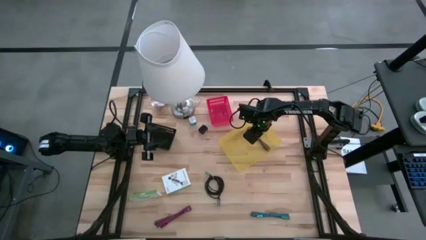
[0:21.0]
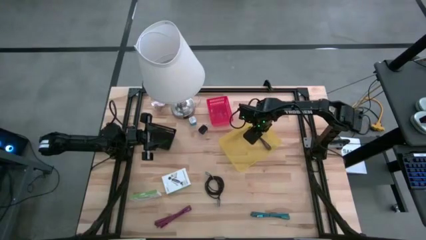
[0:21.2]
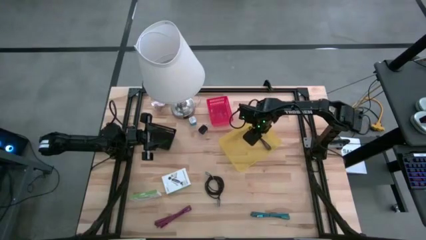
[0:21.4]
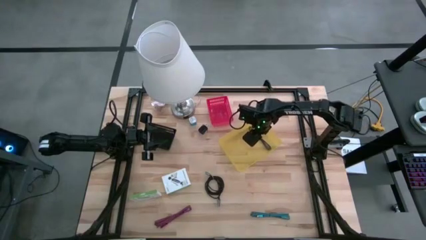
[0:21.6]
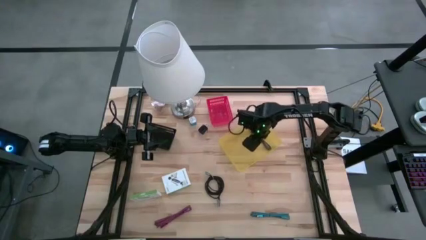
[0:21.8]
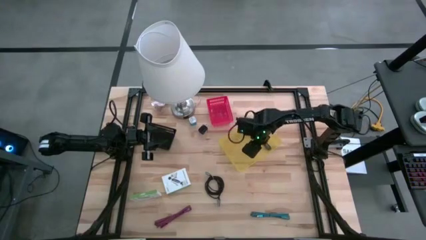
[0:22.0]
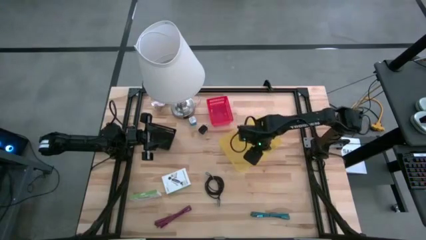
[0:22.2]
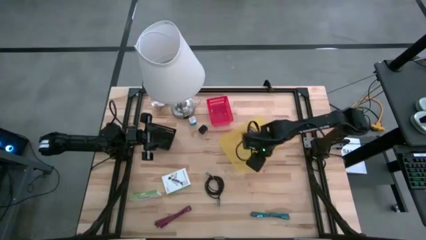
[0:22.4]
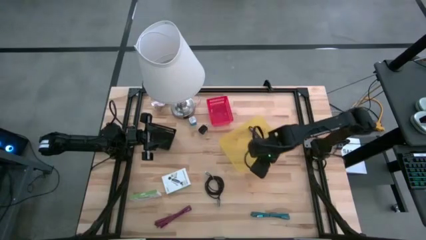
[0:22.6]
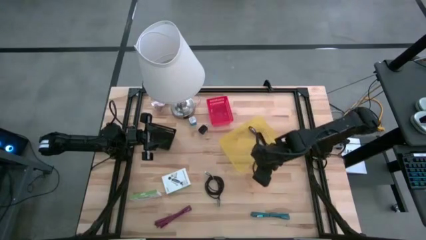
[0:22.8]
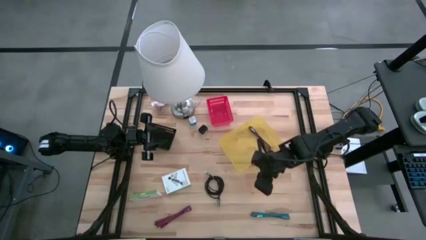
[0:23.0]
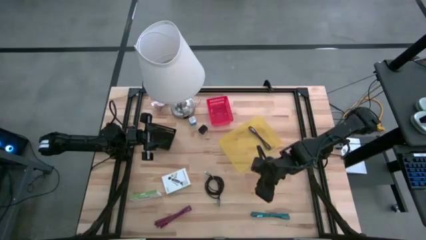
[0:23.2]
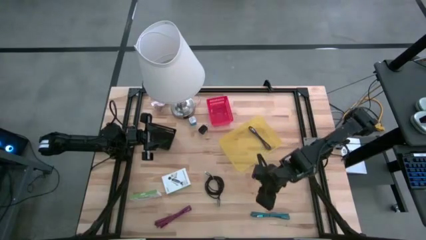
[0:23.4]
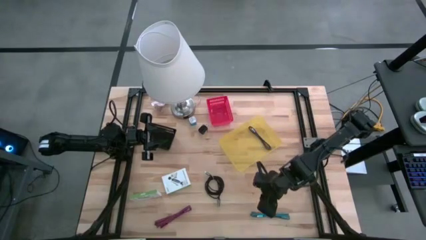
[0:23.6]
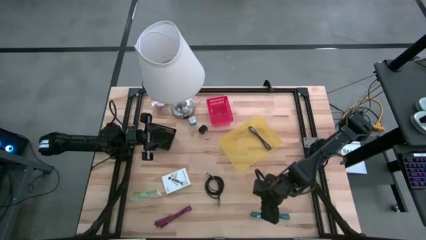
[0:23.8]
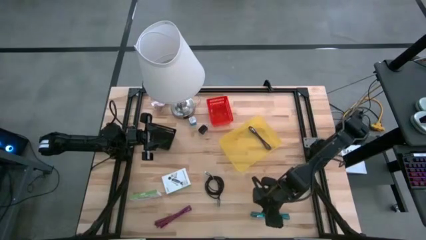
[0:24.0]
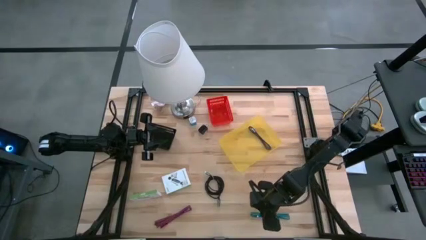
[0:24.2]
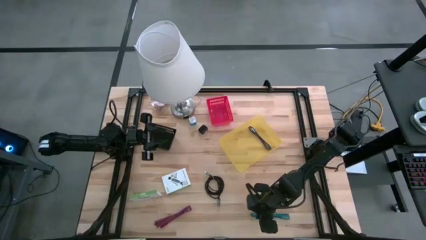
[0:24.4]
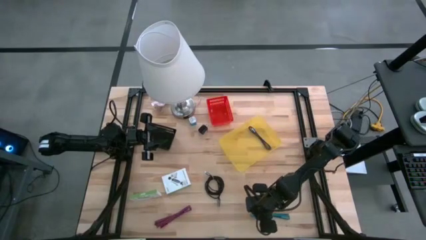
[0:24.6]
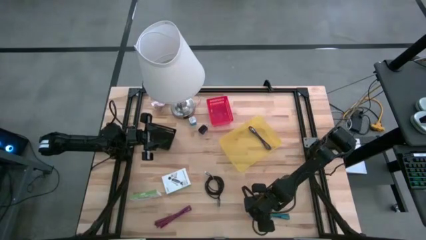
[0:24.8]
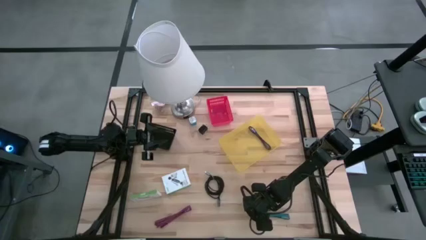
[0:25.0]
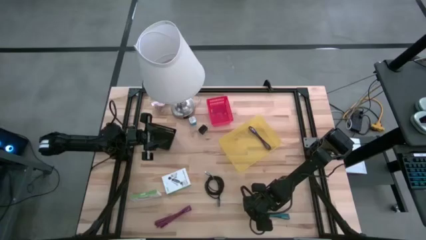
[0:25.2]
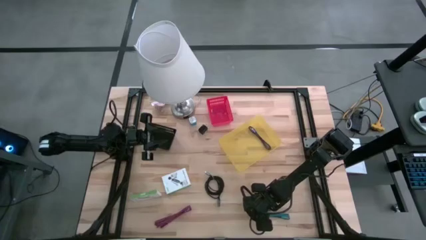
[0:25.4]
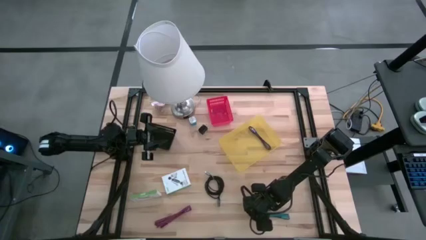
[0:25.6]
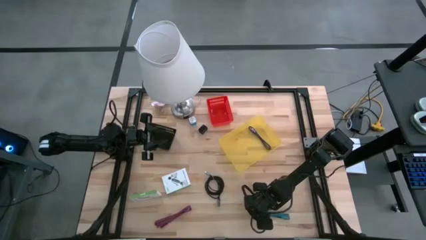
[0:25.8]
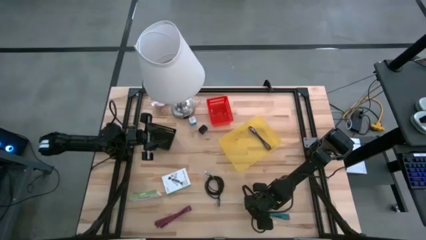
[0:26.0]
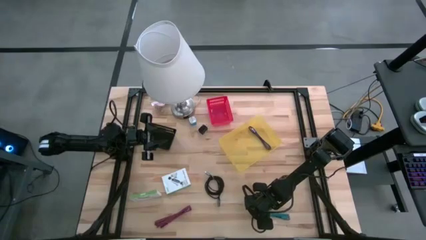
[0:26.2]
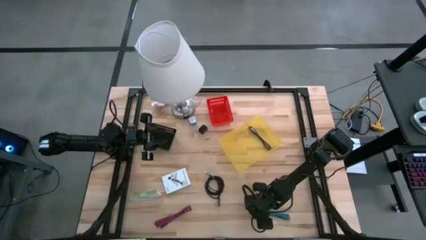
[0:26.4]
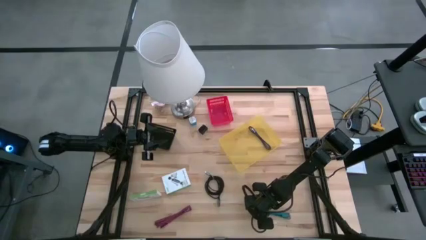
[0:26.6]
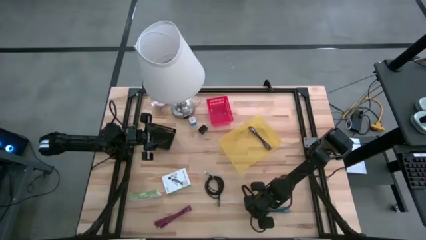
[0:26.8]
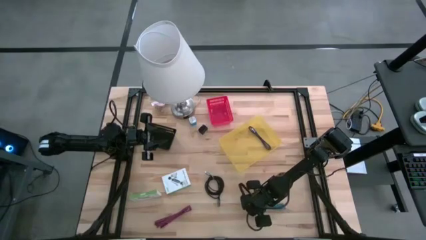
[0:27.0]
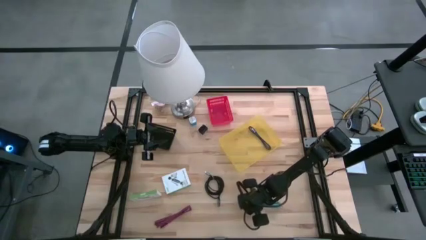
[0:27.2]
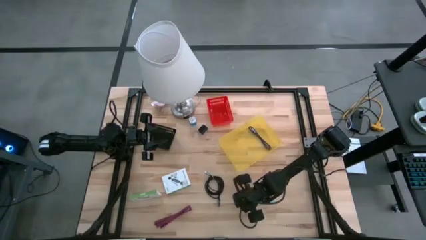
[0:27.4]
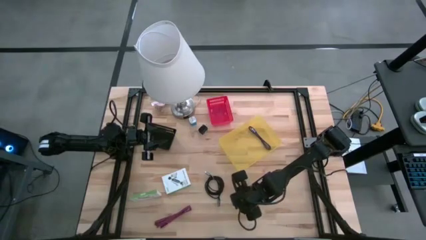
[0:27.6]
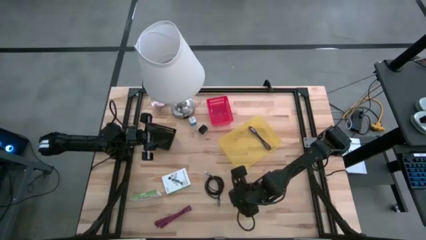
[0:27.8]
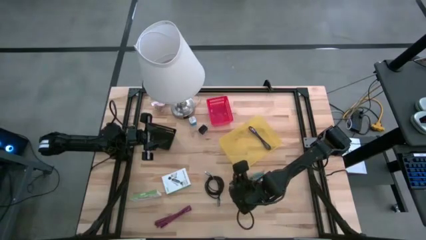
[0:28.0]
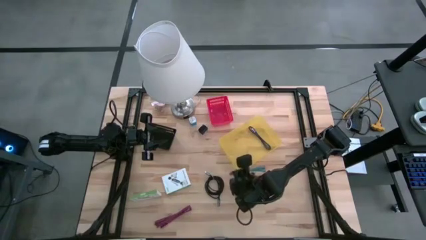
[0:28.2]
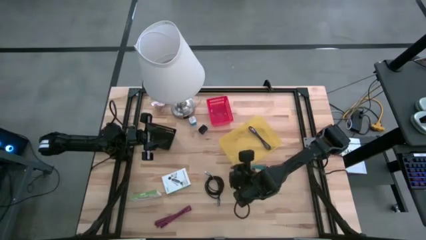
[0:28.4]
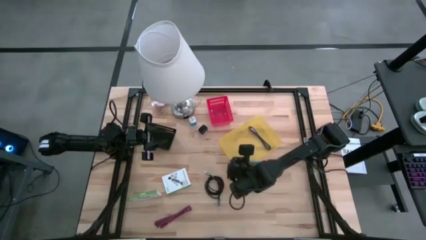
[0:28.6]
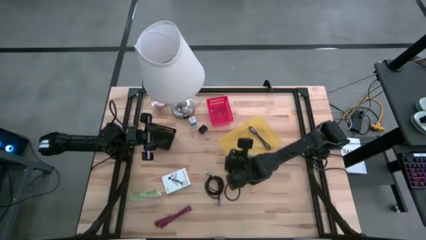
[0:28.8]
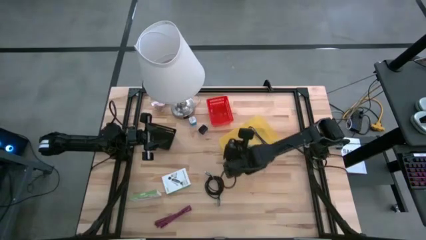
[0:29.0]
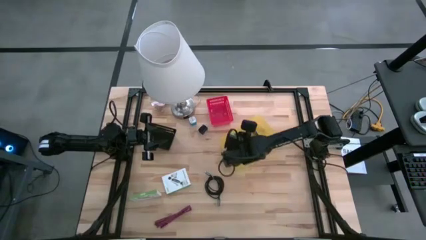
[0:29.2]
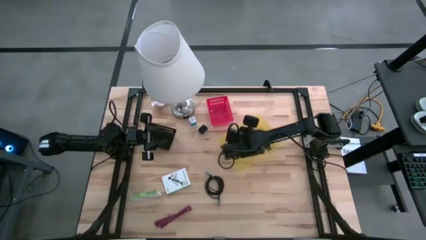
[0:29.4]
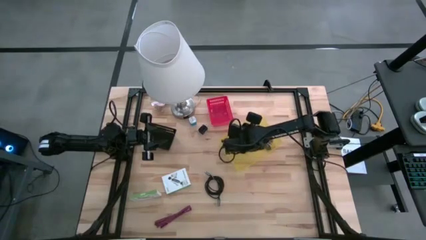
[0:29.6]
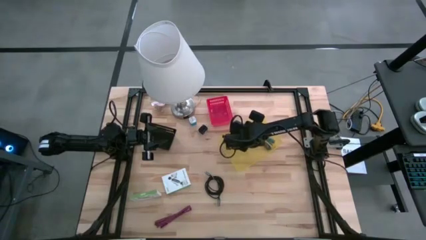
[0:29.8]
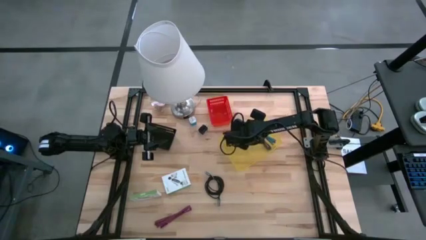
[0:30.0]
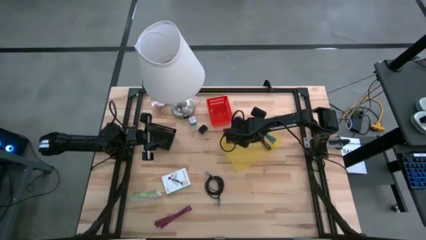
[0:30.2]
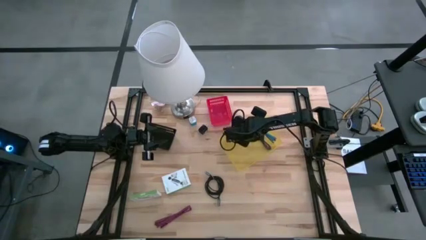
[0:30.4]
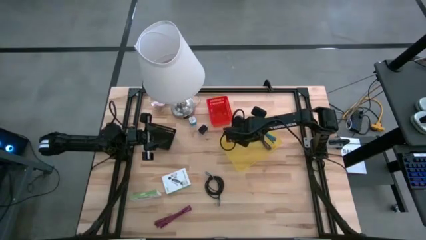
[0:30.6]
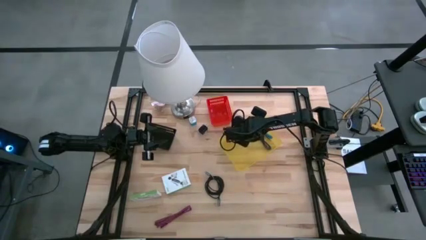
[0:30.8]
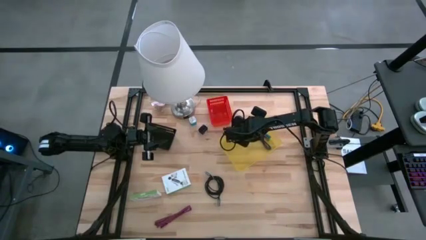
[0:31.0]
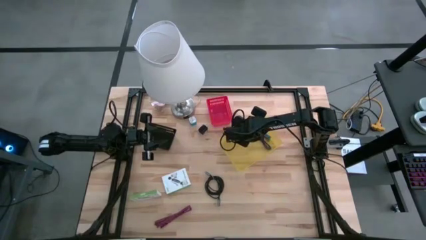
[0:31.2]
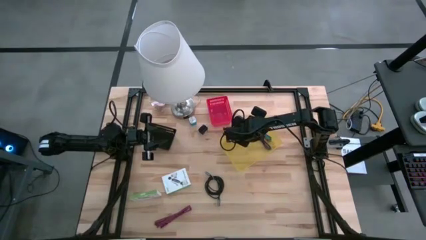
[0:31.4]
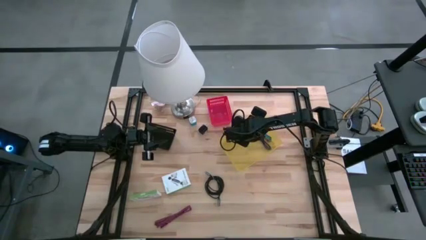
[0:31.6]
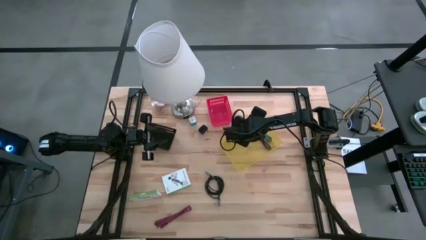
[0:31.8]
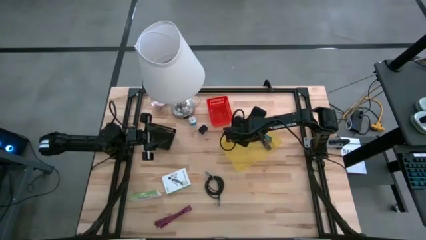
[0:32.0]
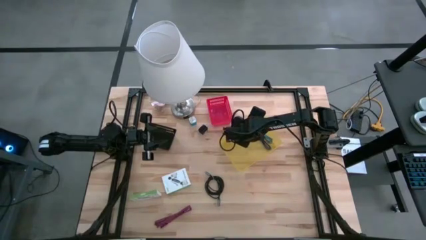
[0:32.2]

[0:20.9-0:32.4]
Task: Pick and place items into bin
Put the light blue charger cable into the yellow bin
